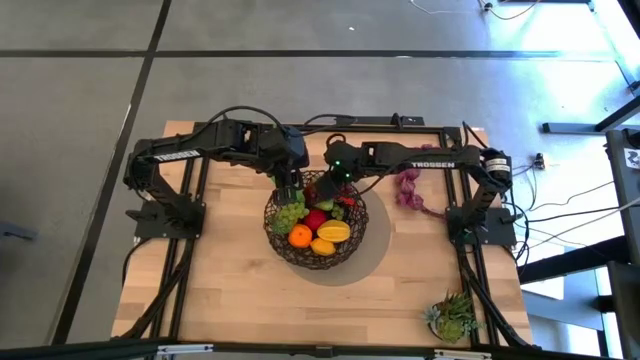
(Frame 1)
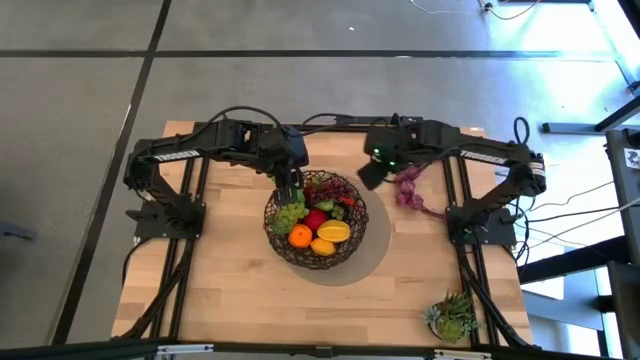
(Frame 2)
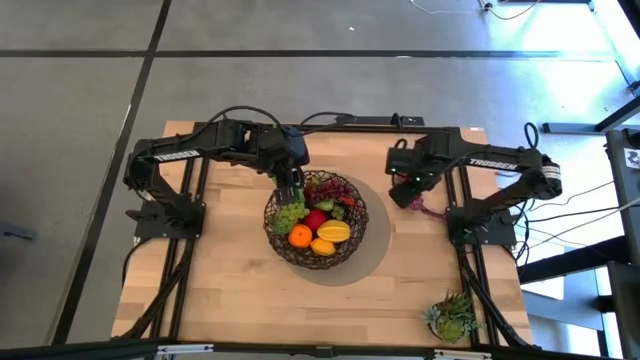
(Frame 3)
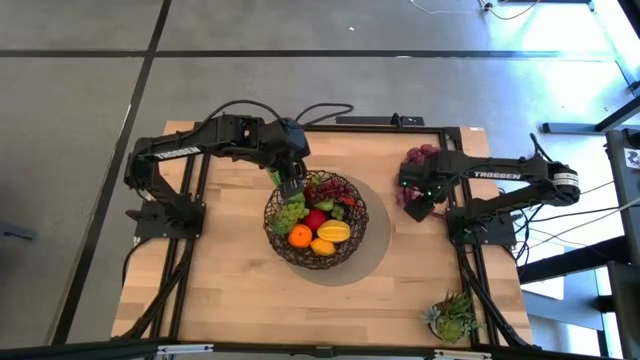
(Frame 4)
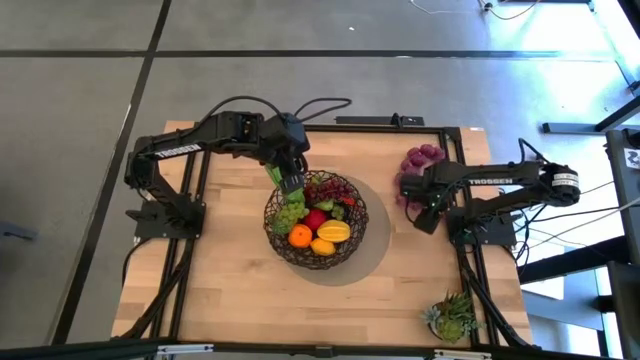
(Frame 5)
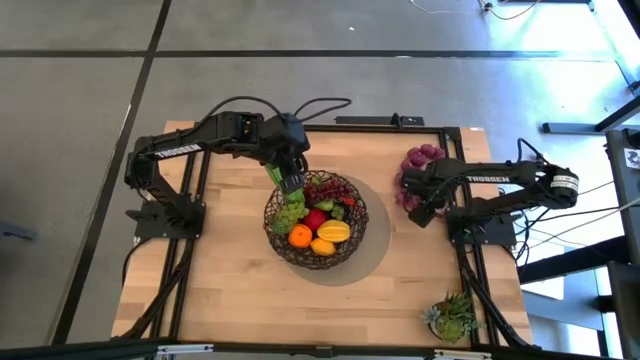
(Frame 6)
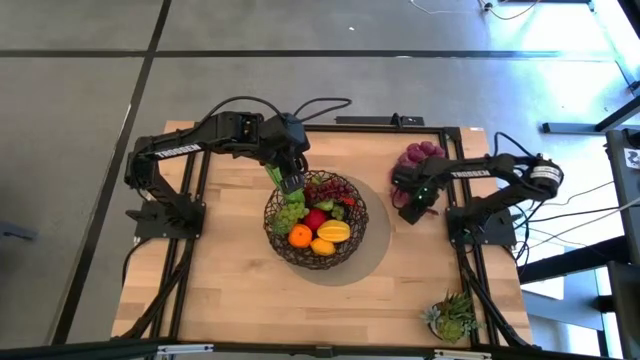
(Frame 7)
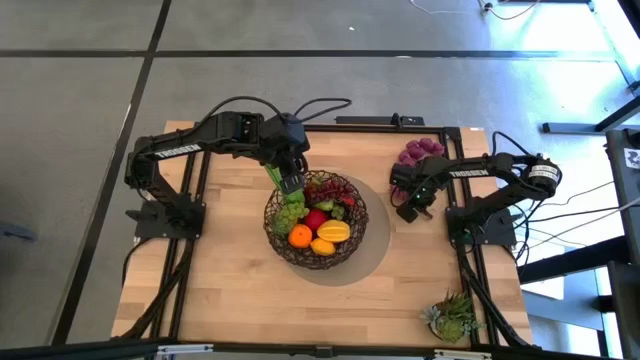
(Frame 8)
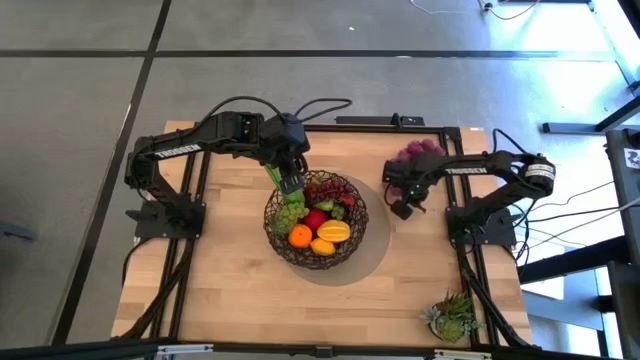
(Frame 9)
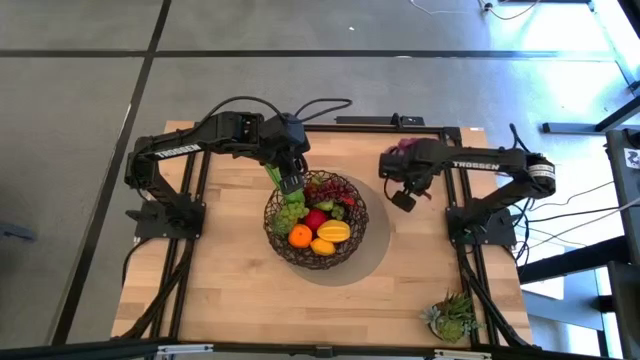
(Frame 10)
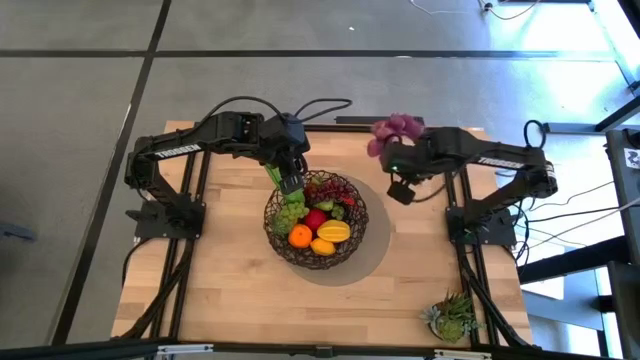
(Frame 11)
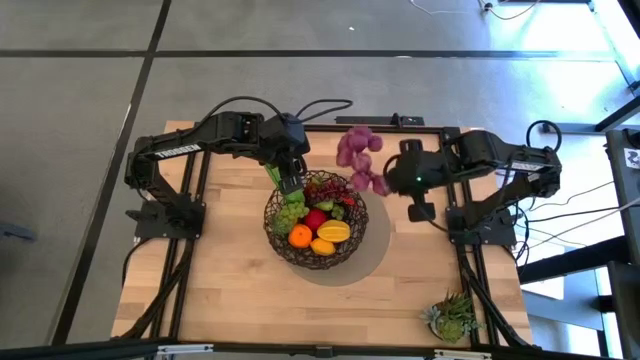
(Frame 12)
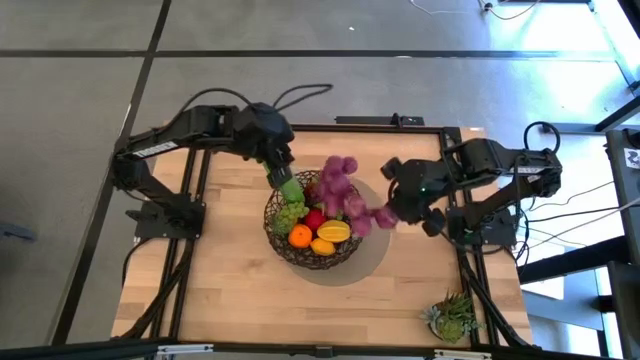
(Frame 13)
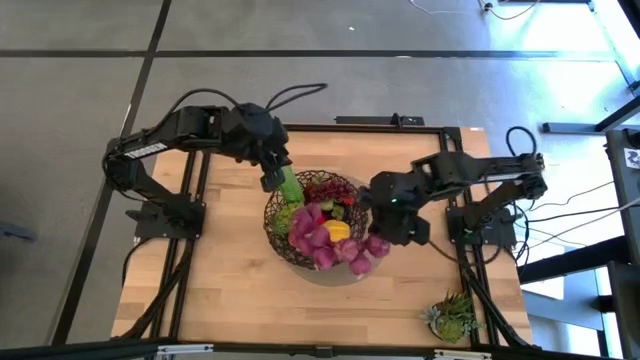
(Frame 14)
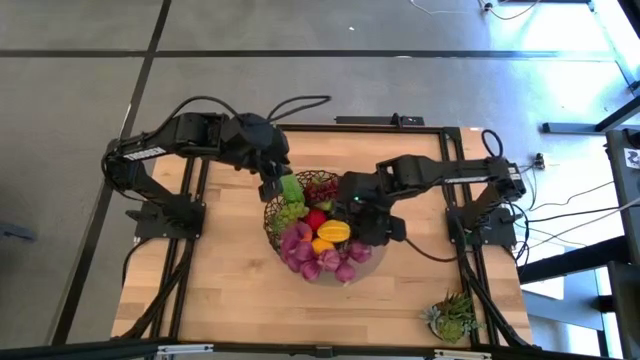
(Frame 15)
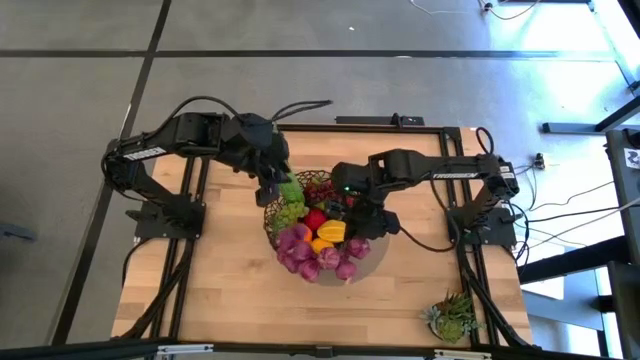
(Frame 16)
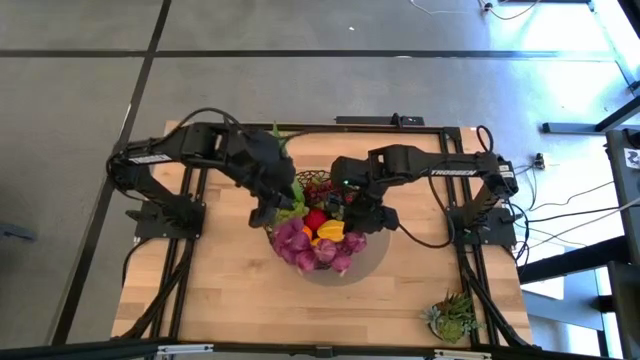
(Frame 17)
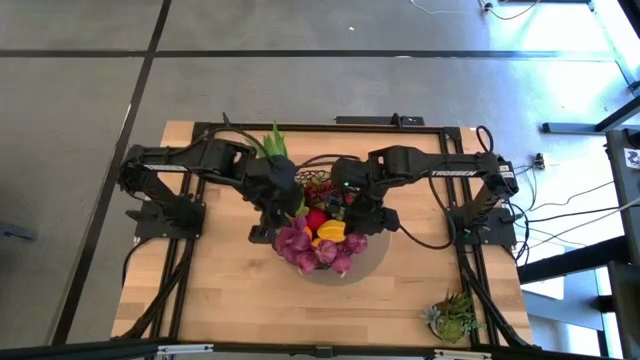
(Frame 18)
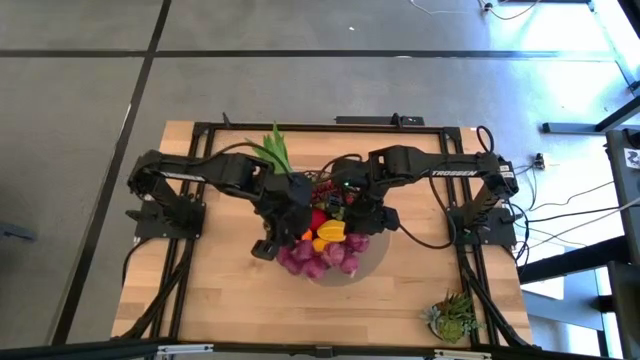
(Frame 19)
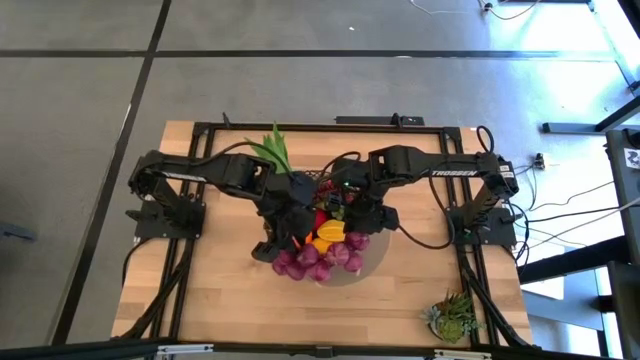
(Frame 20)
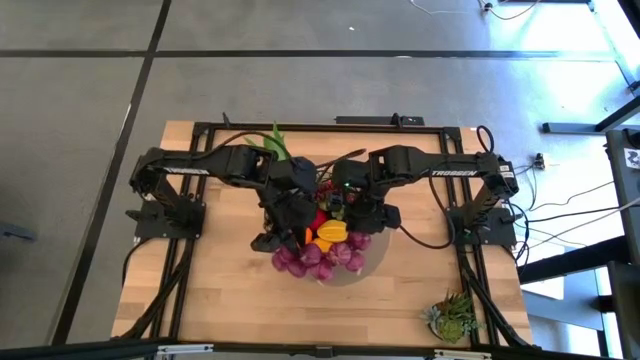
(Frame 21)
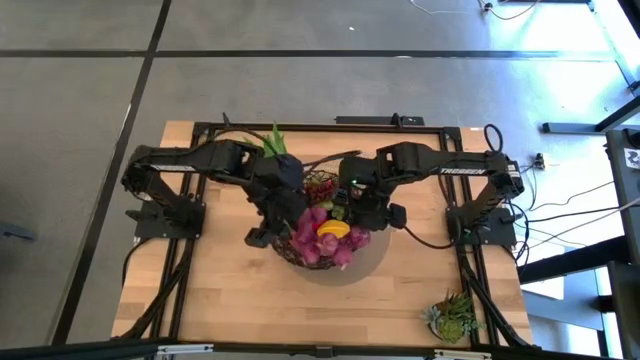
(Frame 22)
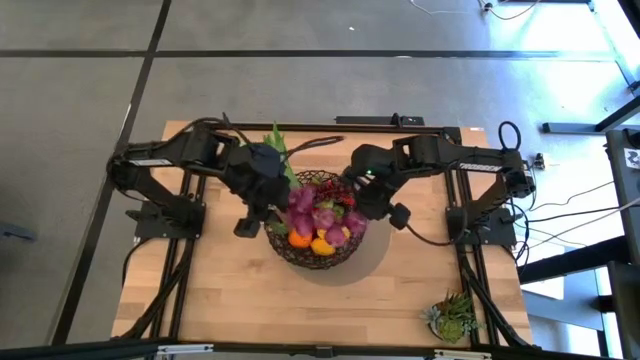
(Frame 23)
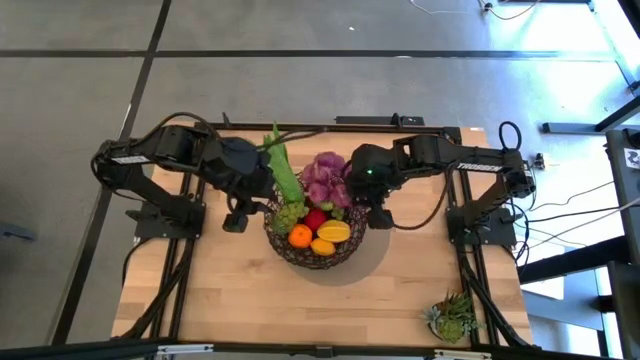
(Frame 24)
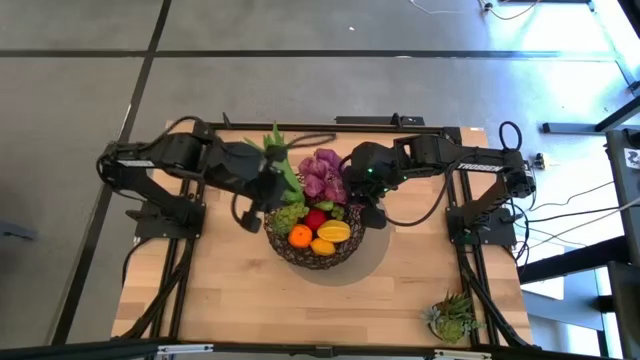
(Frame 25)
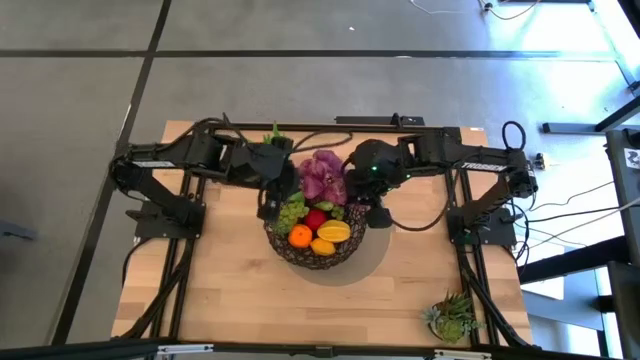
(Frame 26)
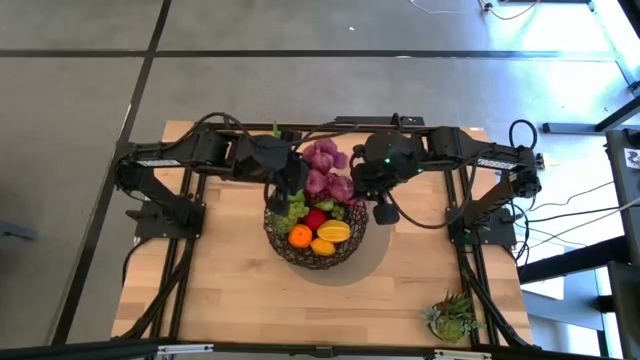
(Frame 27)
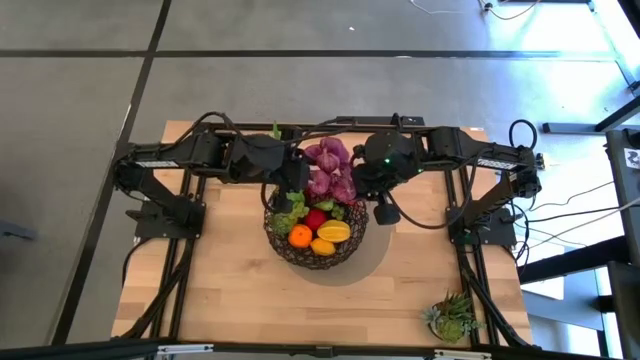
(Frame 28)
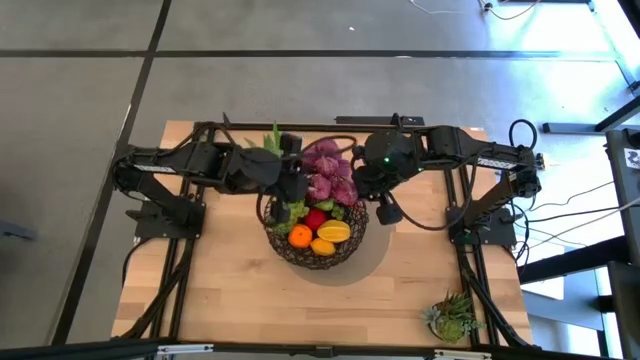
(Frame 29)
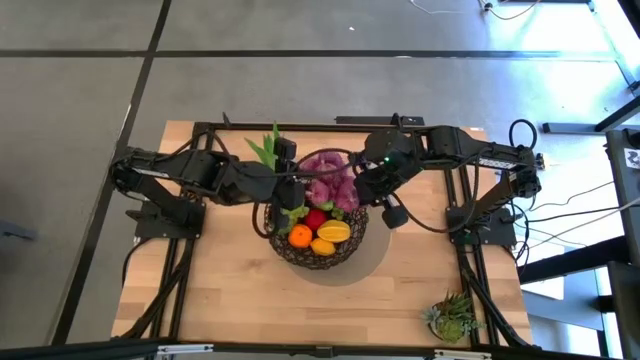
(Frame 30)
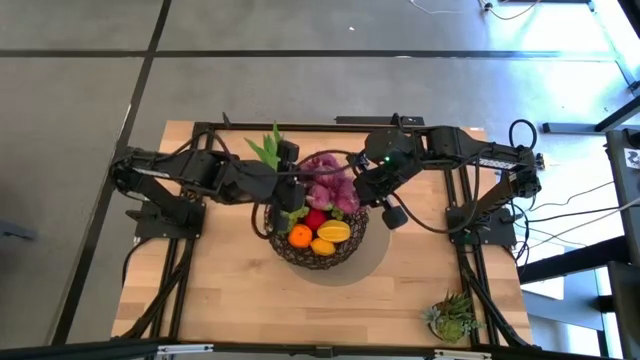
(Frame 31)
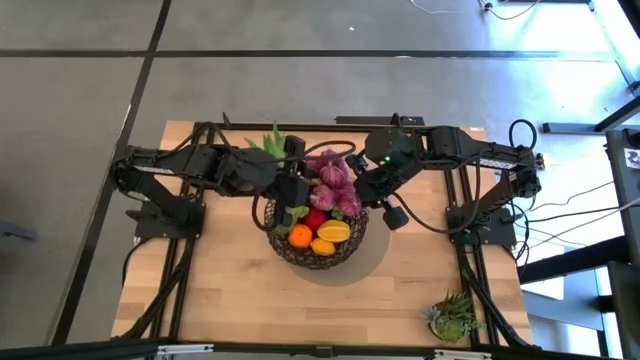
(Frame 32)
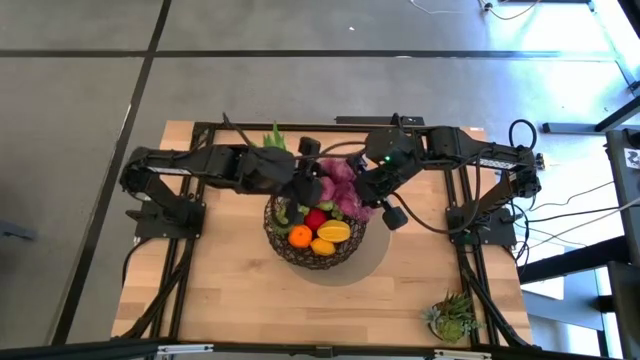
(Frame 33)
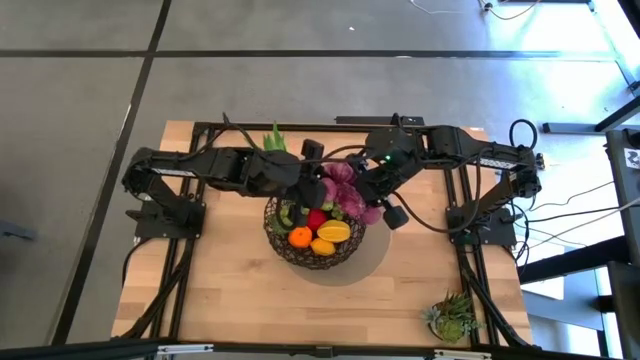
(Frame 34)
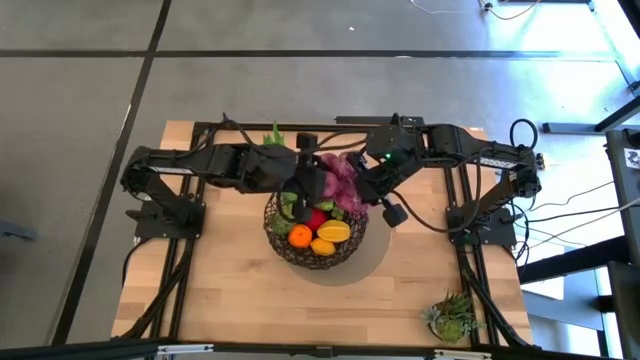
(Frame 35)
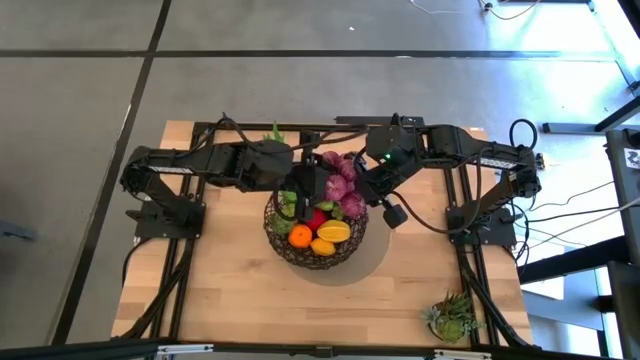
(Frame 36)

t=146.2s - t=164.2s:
Task: Build produce basket
Put the purple garlic into the wire basket

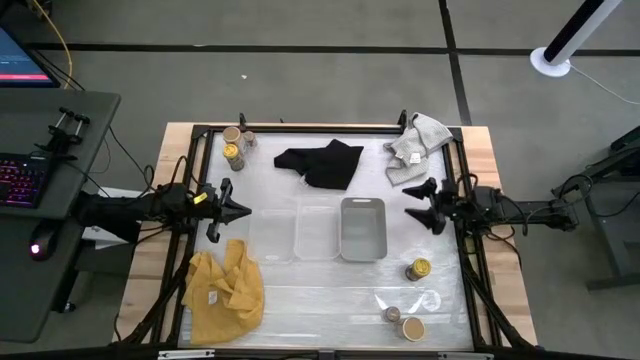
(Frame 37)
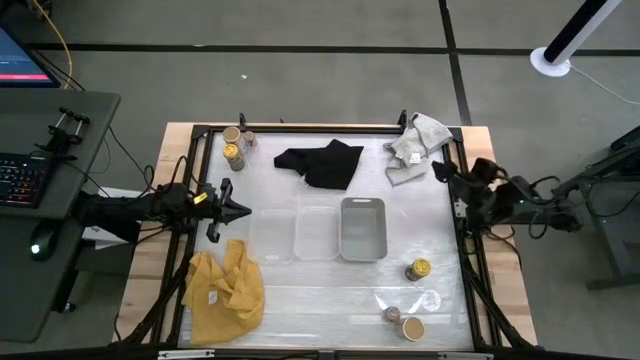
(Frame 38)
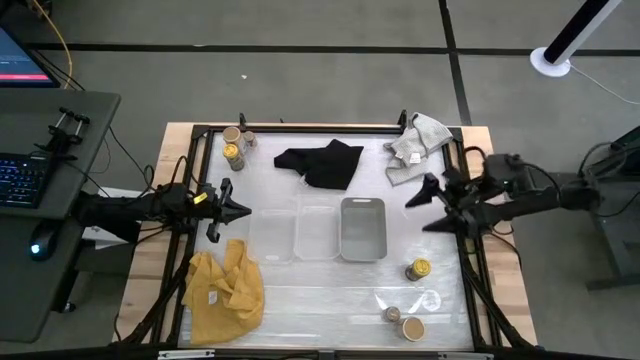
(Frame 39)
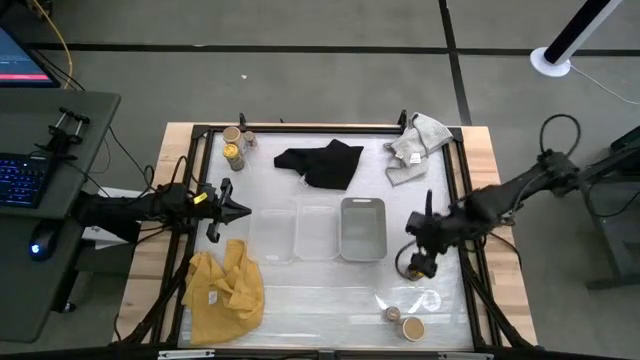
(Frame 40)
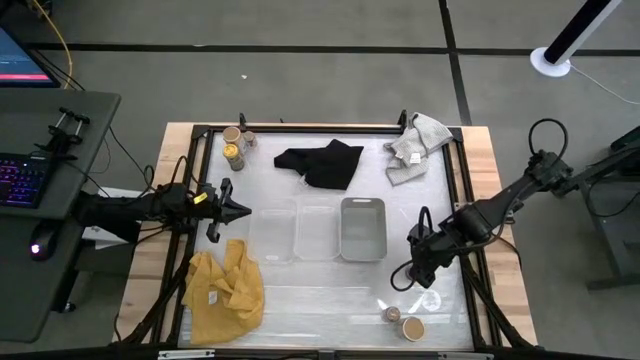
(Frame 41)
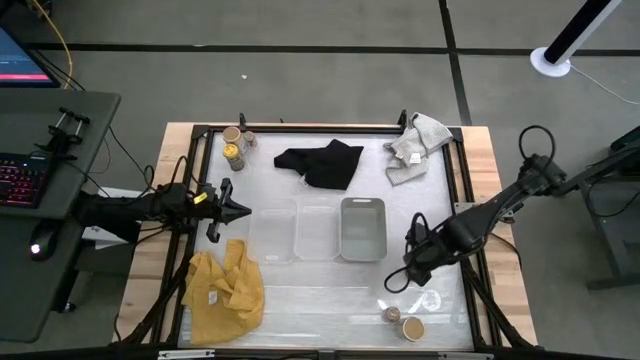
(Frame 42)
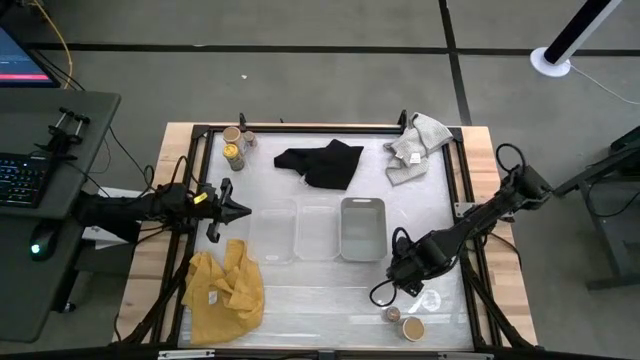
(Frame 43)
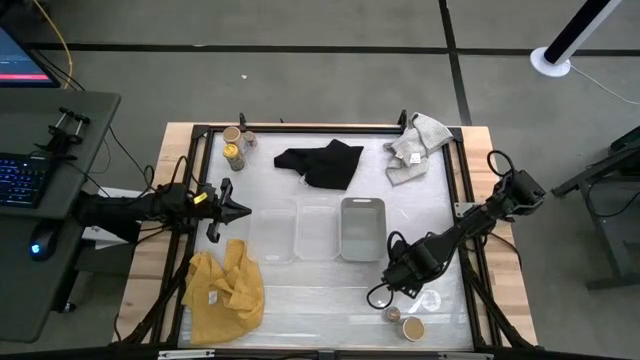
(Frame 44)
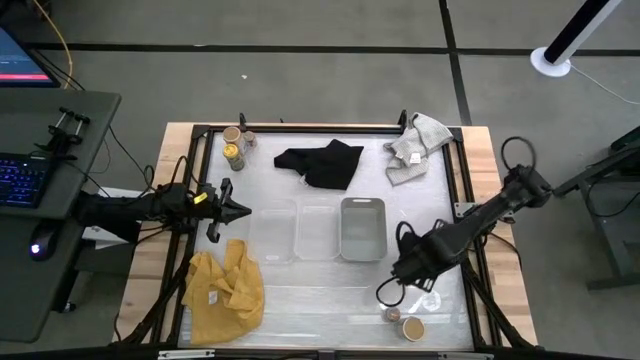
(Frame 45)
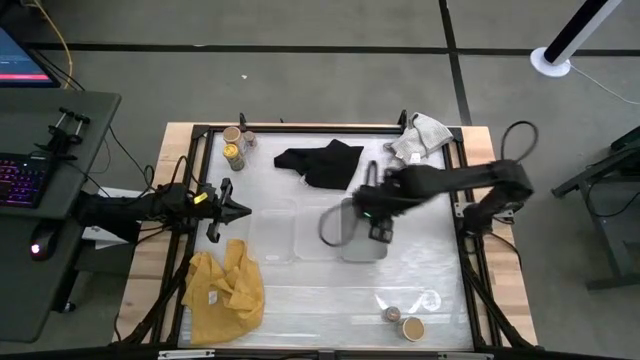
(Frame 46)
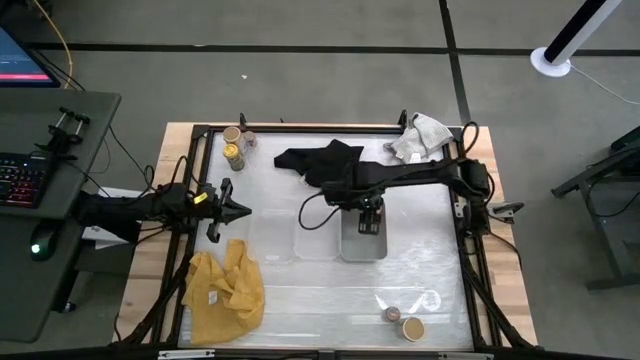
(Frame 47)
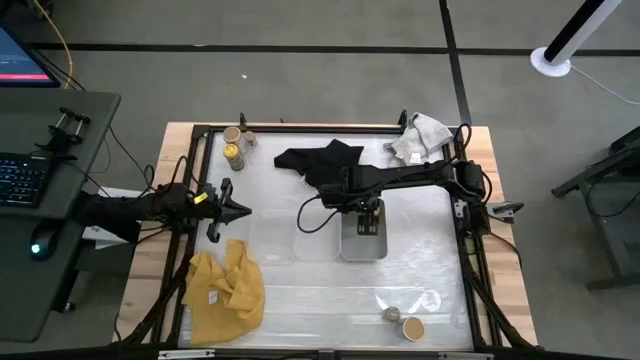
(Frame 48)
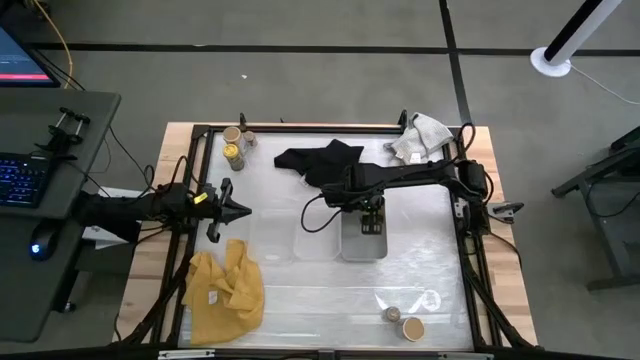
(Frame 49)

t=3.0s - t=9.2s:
Task: Sort spices by type
Put the bottom yellow seasoning can into the gray bin
